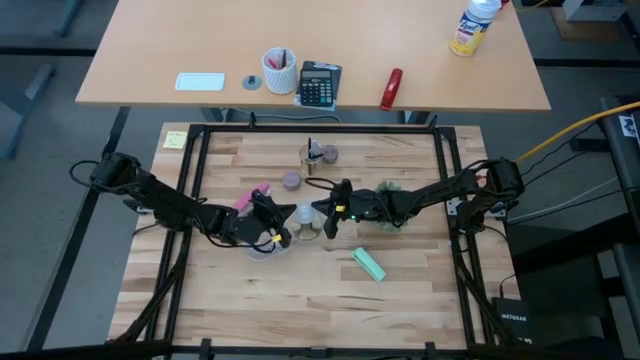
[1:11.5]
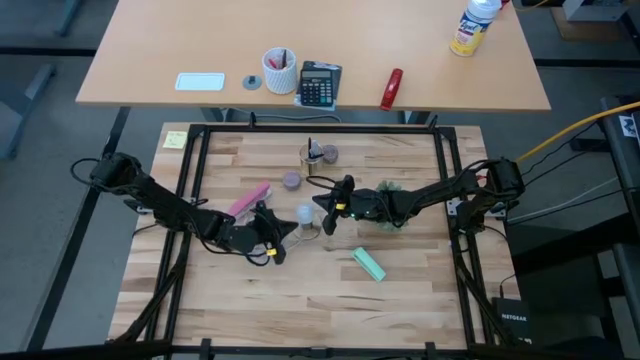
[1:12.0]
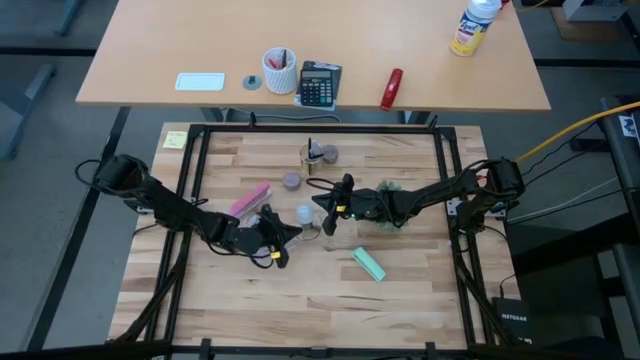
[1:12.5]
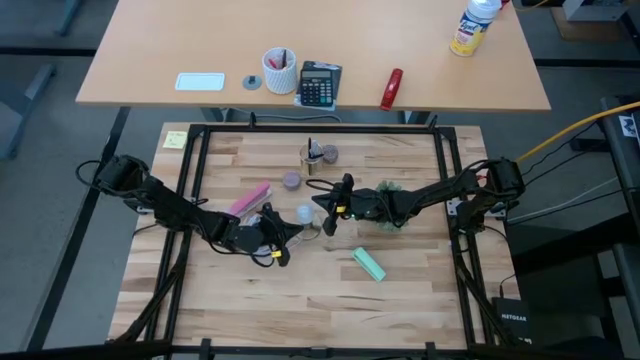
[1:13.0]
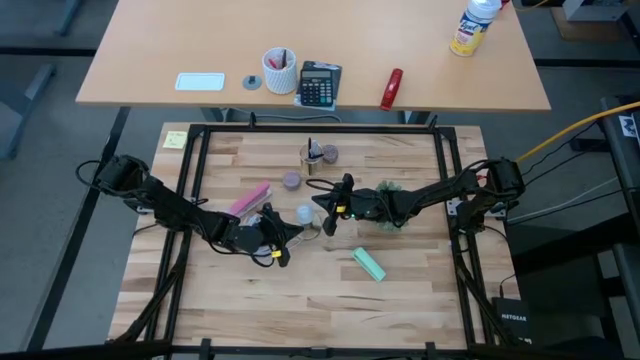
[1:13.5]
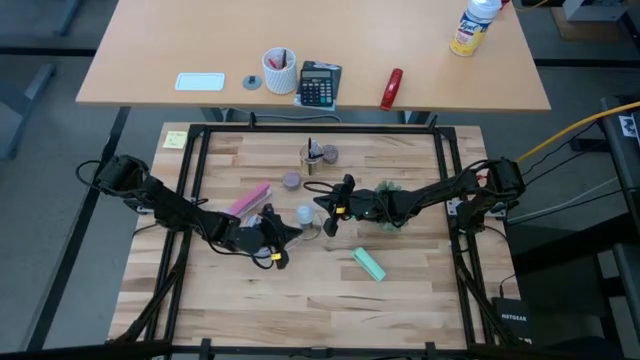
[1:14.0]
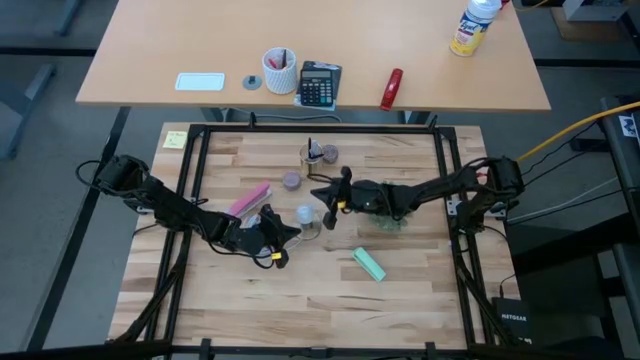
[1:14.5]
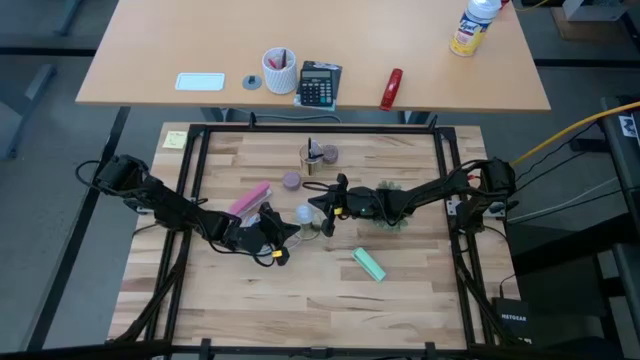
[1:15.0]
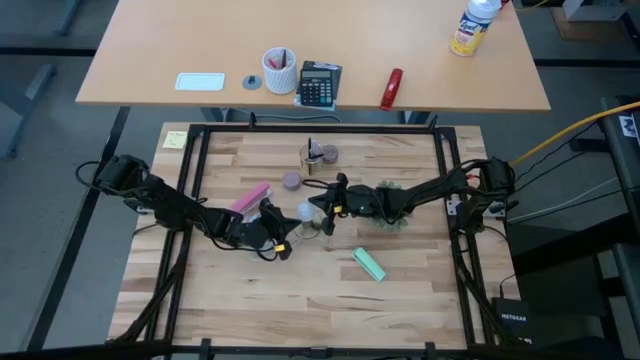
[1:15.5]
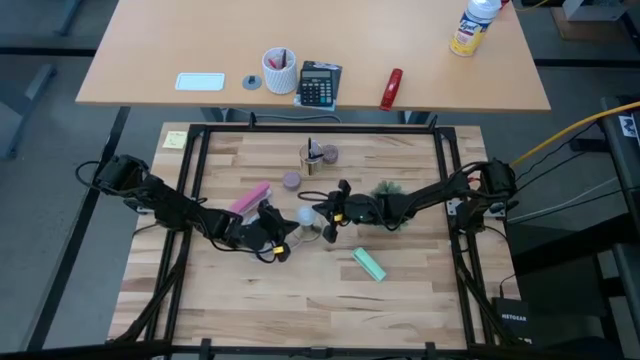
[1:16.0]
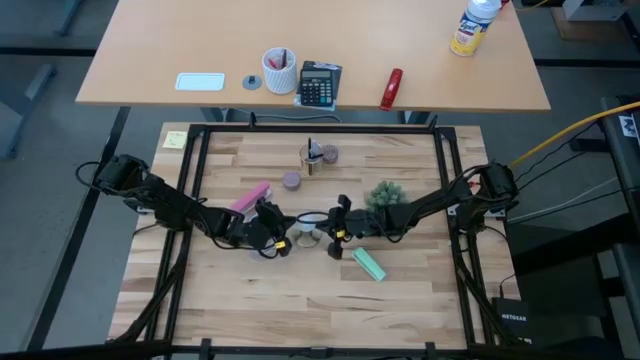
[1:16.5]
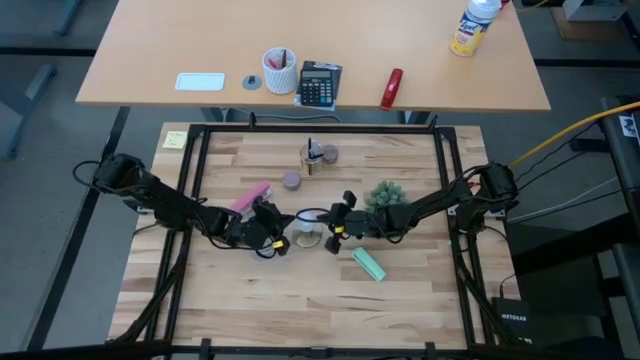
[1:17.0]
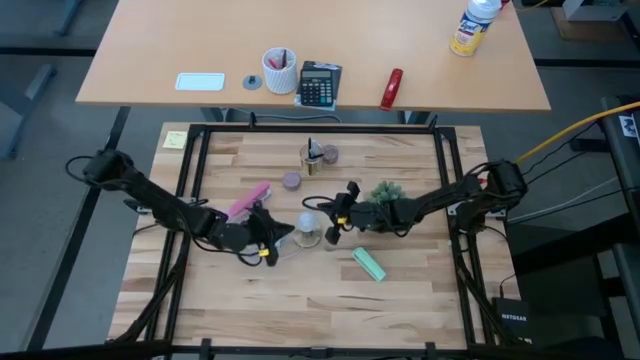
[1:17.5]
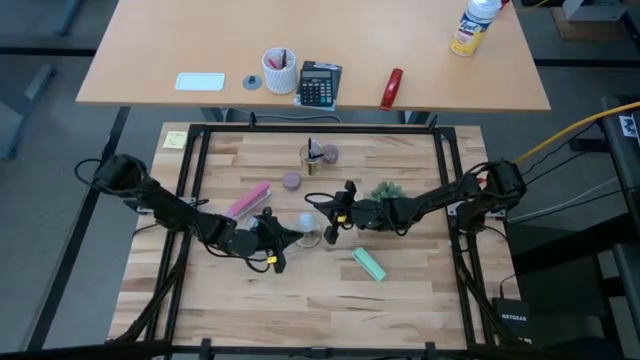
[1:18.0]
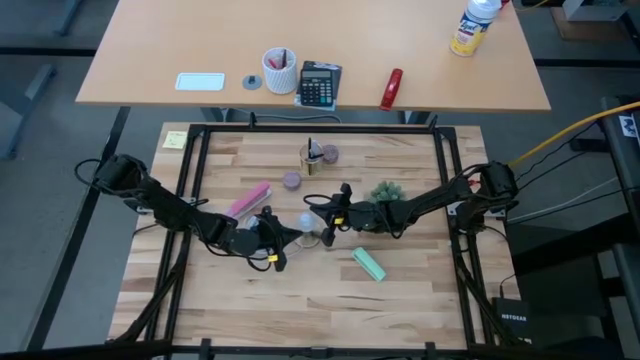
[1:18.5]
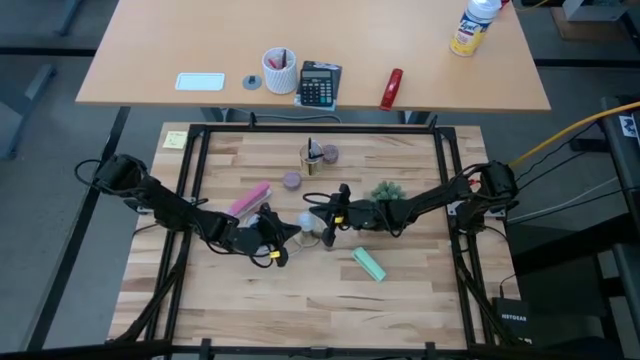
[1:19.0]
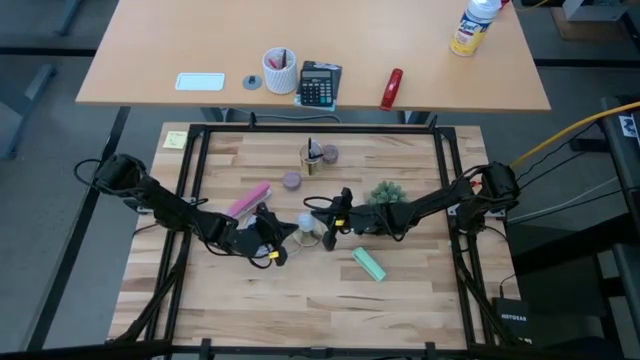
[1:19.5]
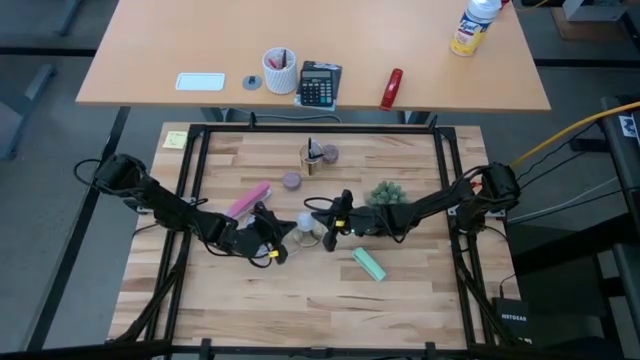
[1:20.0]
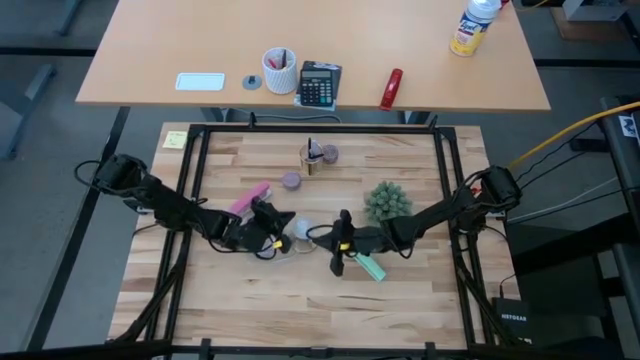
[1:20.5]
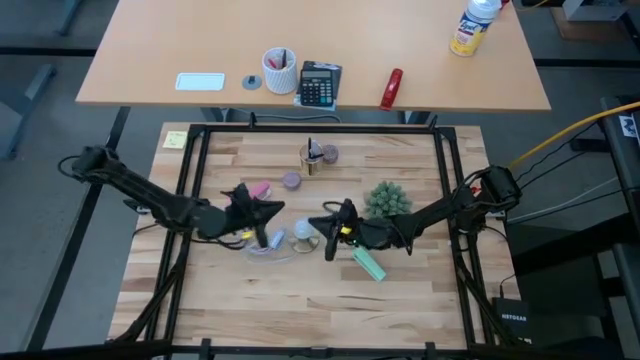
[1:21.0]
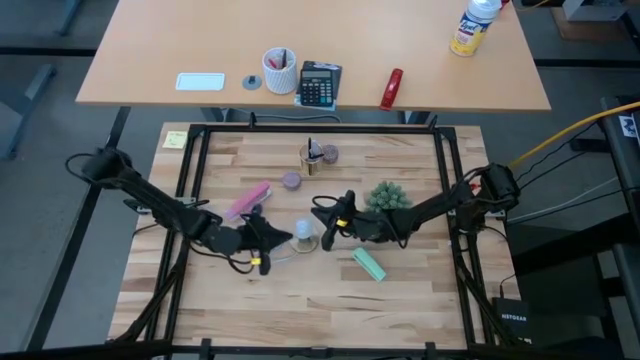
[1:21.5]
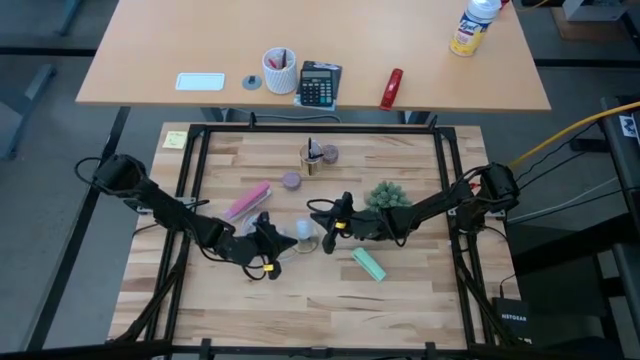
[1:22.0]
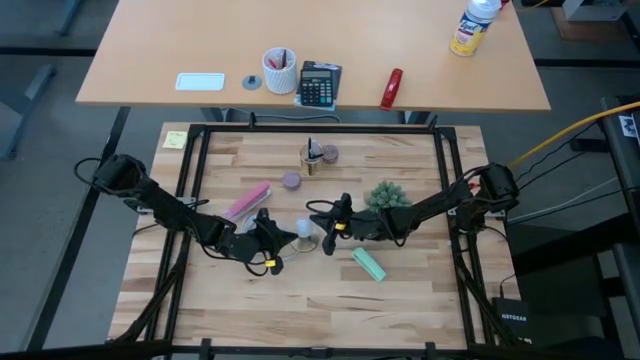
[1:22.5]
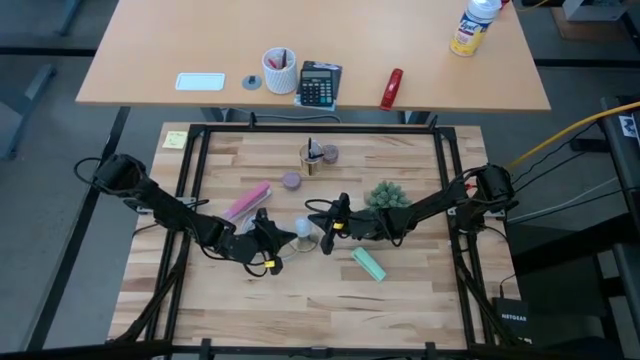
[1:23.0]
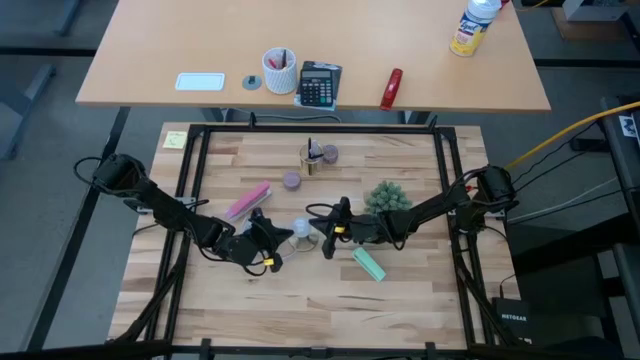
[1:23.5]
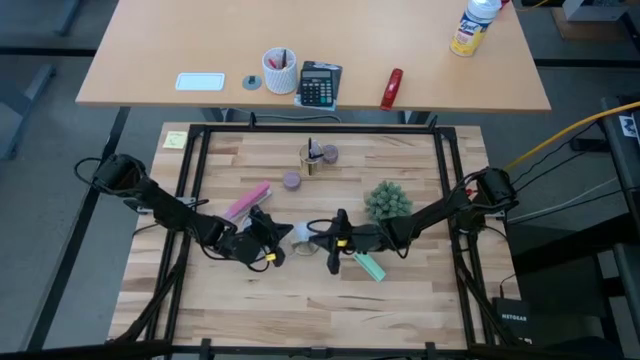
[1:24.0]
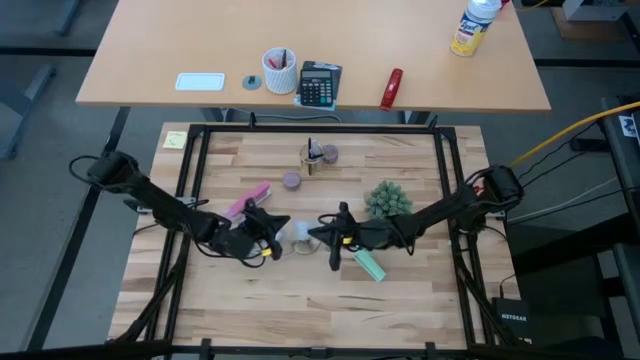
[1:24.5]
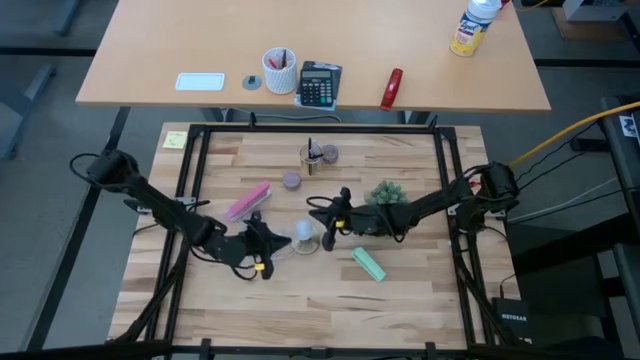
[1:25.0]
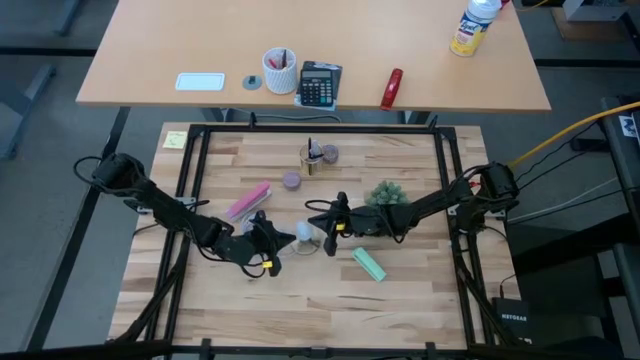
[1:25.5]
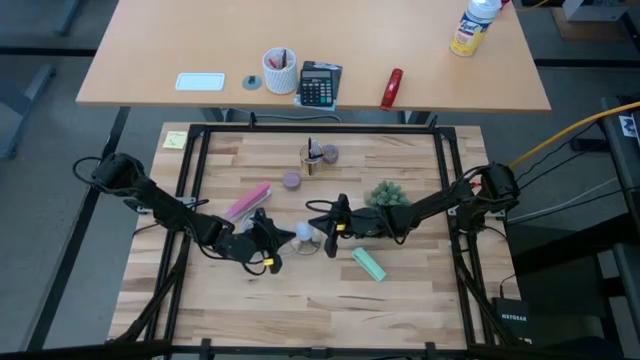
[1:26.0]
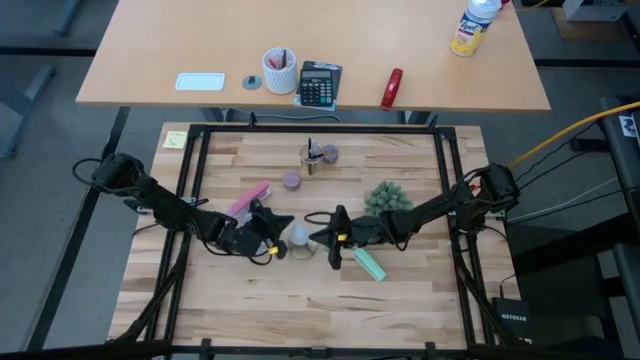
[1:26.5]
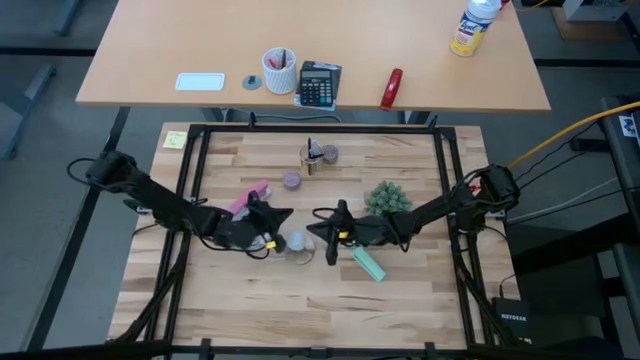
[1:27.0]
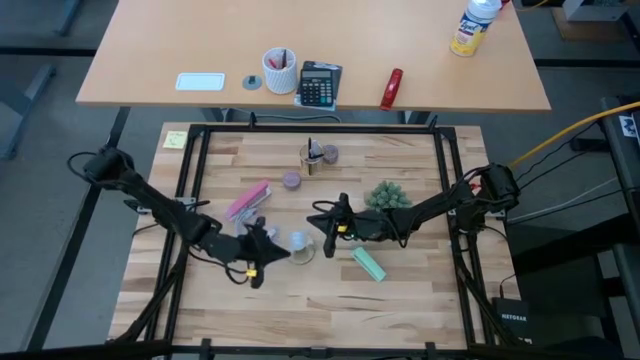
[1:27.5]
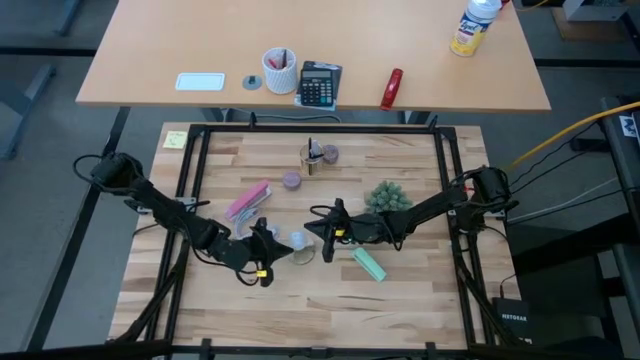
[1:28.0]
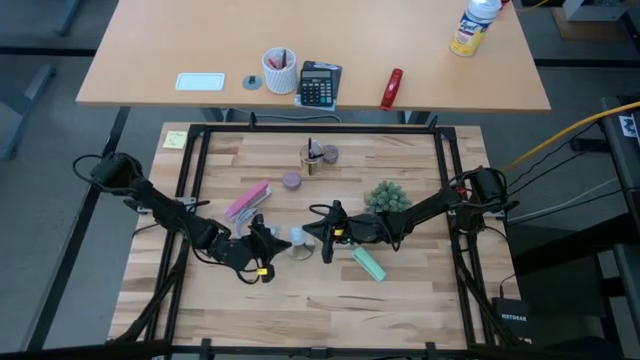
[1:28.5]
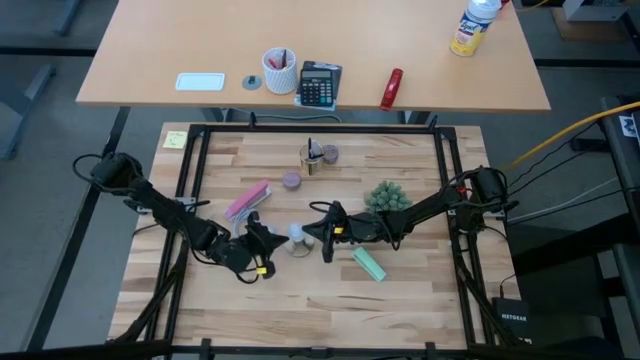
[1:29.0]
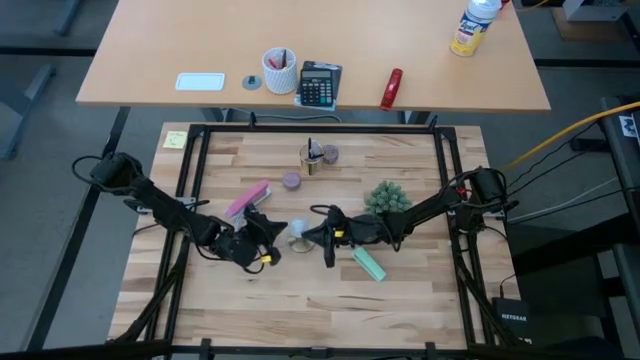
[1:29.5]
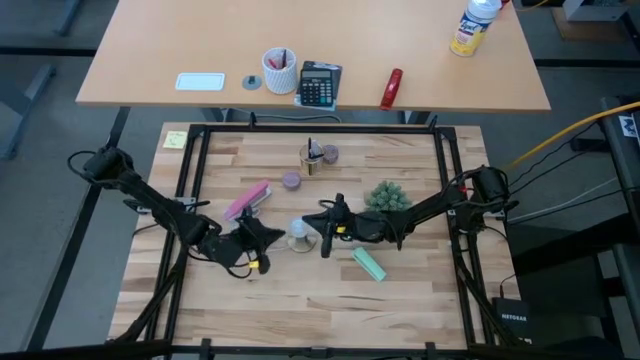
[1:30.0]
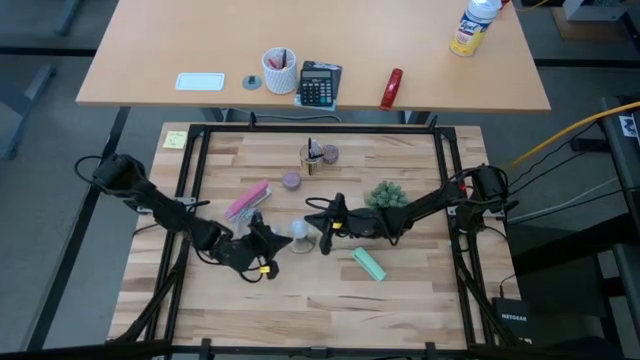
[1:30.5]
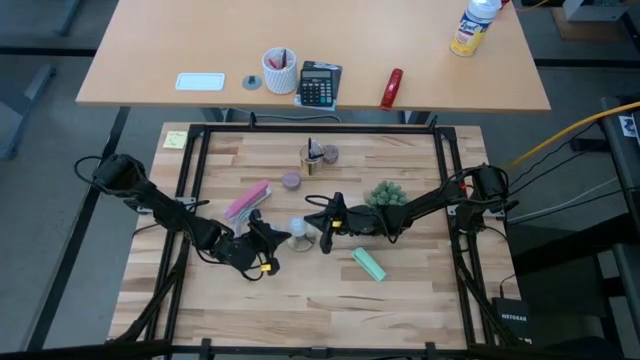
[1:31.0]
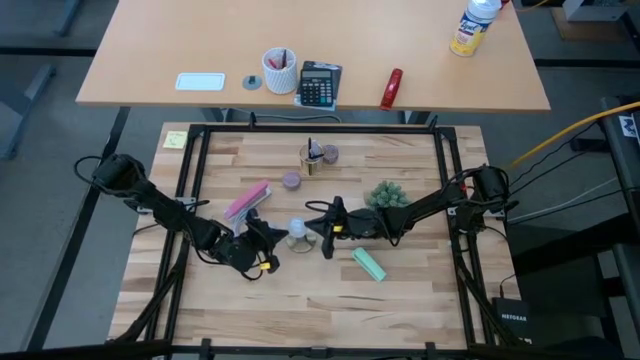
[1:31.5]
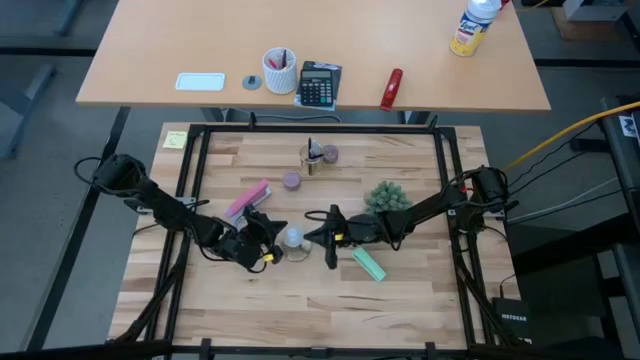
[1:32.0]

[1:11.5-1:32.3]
Task: Screw lightbulb
Insert the lightbulb into the lamp
